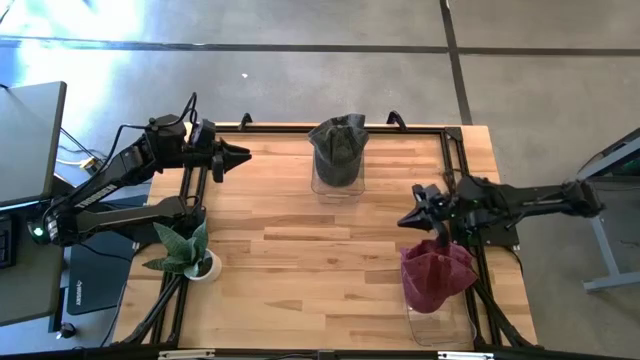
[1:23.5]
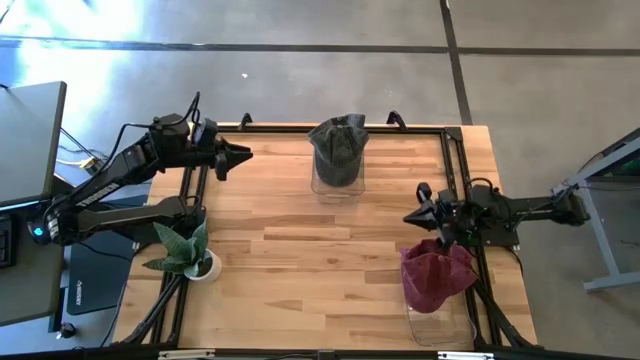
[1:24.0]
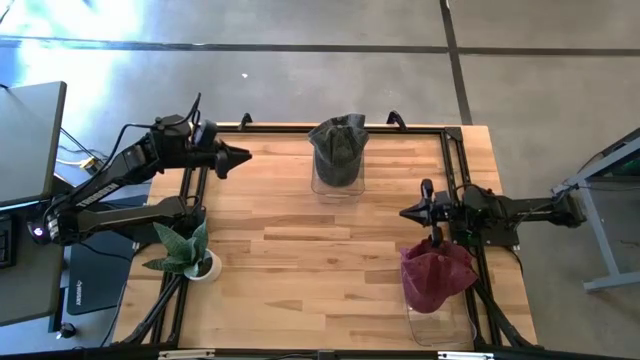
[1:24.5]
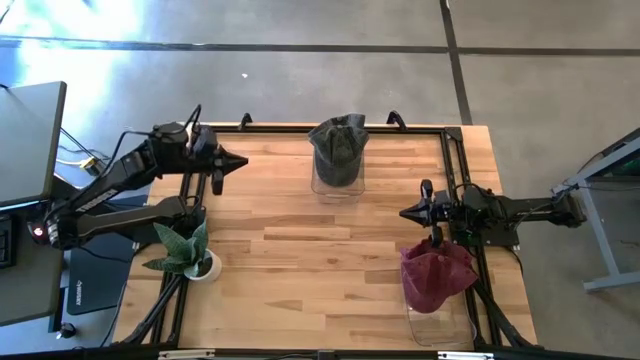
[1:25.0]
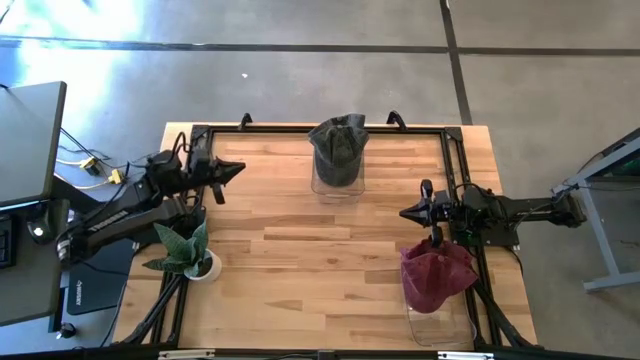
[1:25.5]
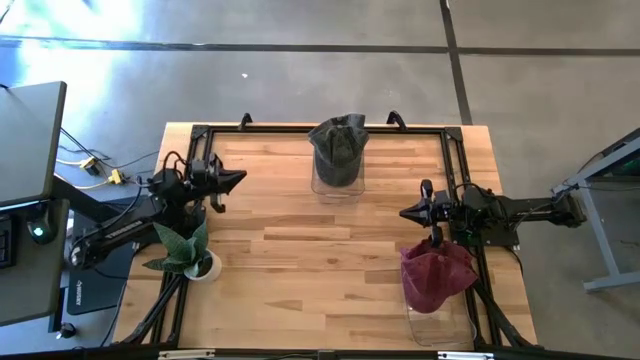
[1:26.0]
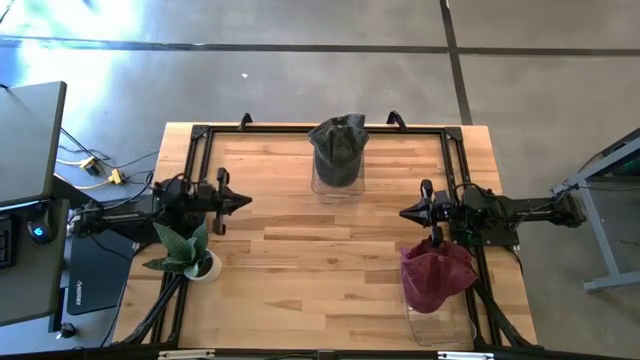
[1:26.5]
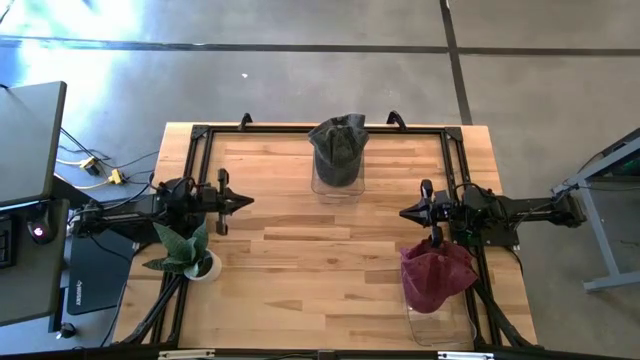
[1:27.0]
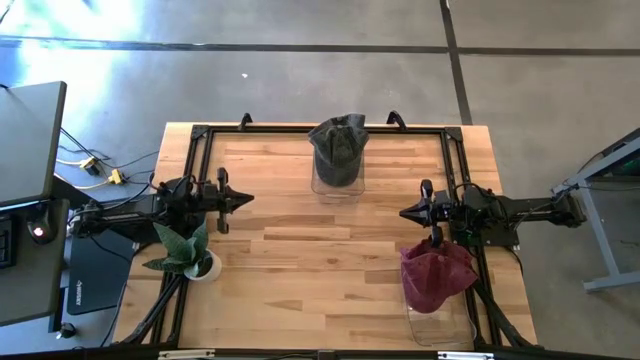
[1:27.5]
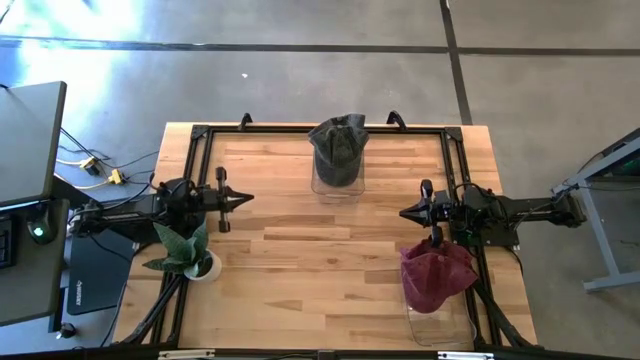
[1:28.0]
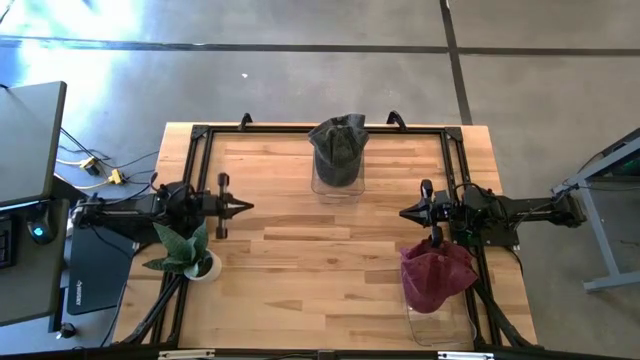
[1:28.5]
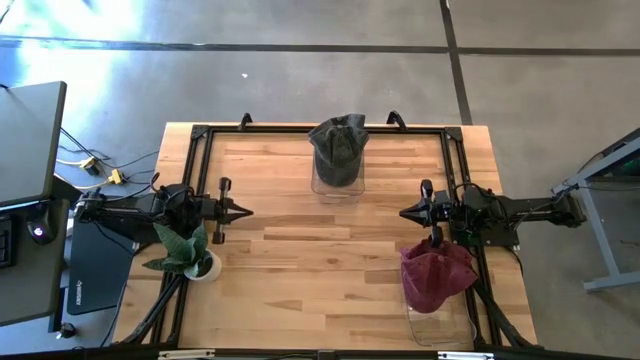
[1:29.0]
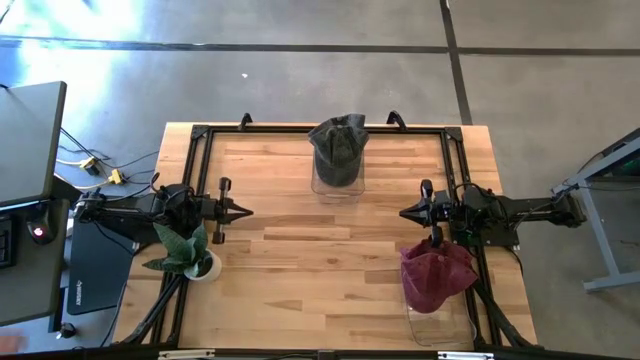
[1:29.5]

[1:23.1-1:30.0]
Task: Pick & Place hat
Return to Home Position

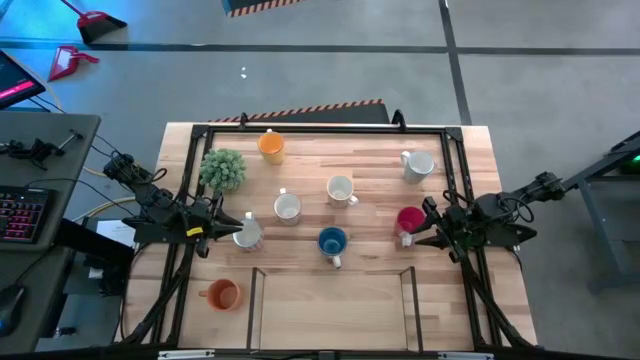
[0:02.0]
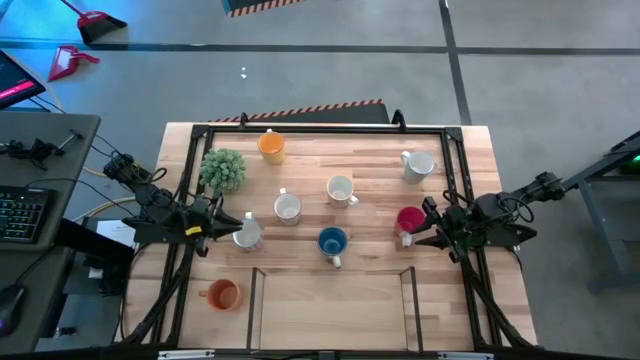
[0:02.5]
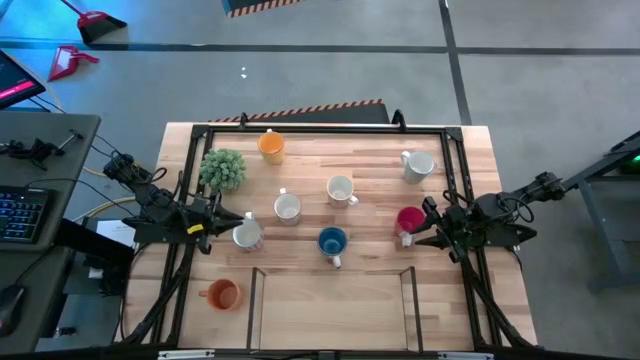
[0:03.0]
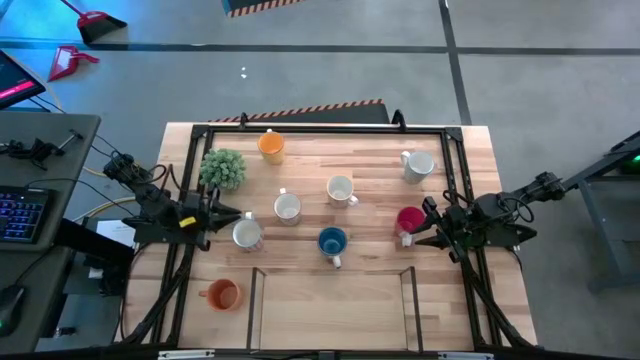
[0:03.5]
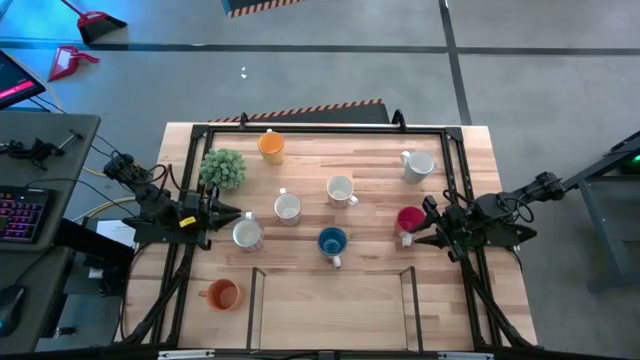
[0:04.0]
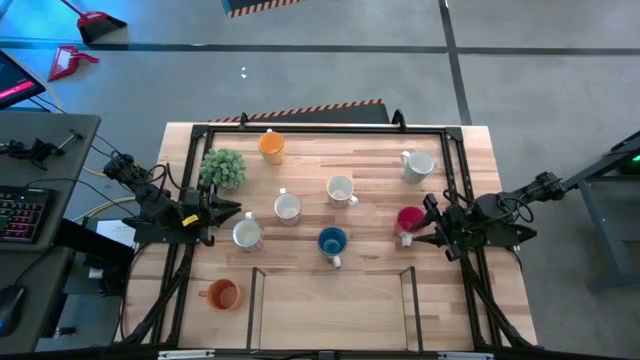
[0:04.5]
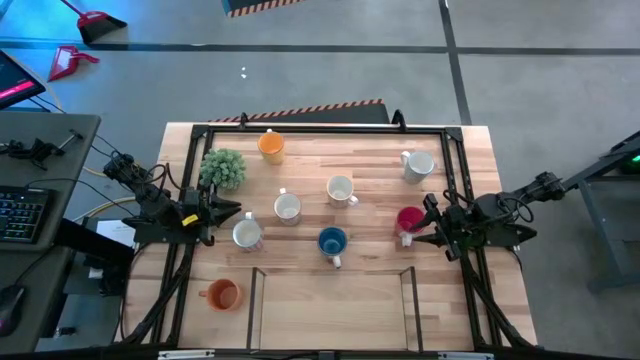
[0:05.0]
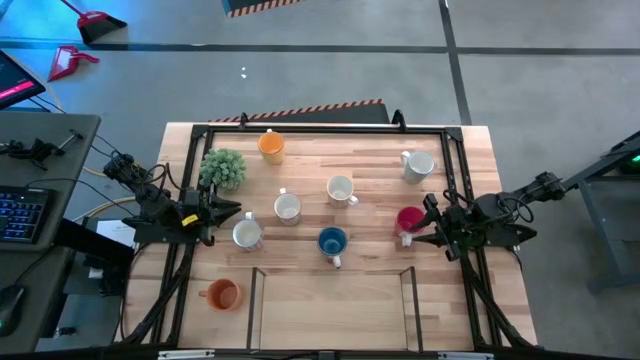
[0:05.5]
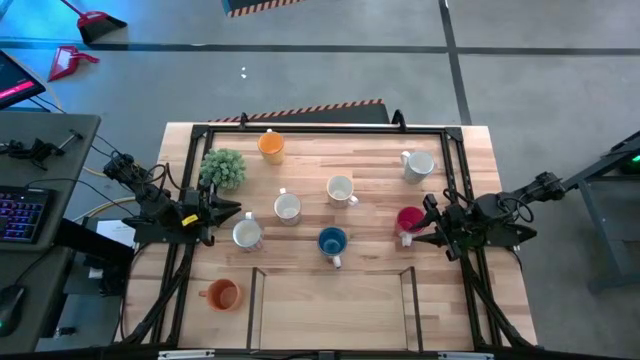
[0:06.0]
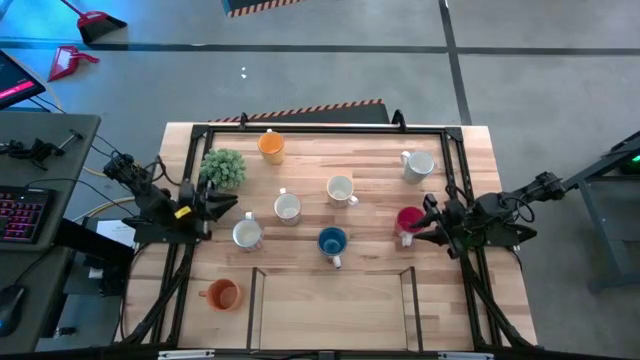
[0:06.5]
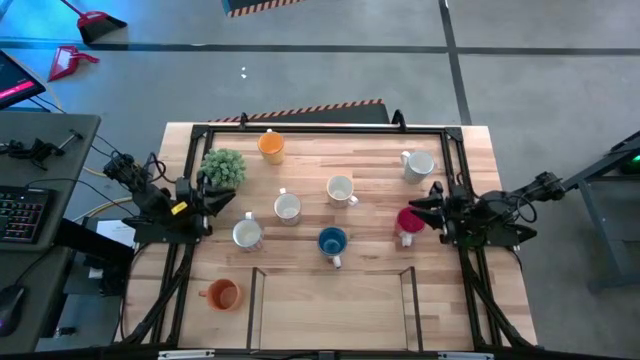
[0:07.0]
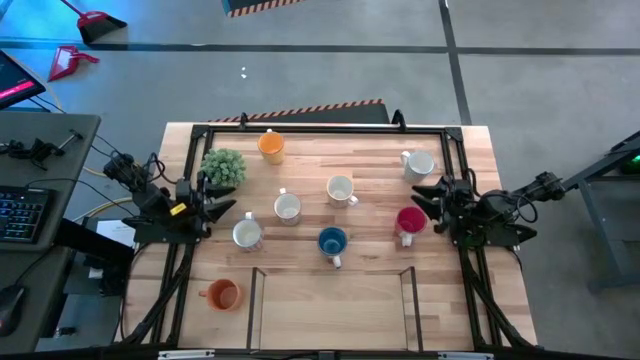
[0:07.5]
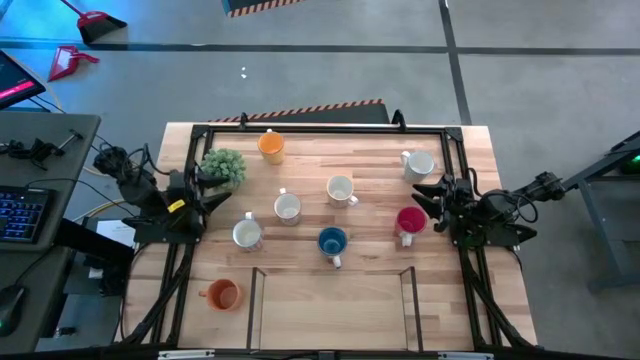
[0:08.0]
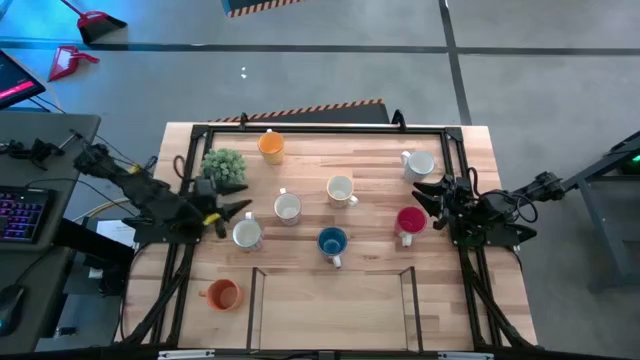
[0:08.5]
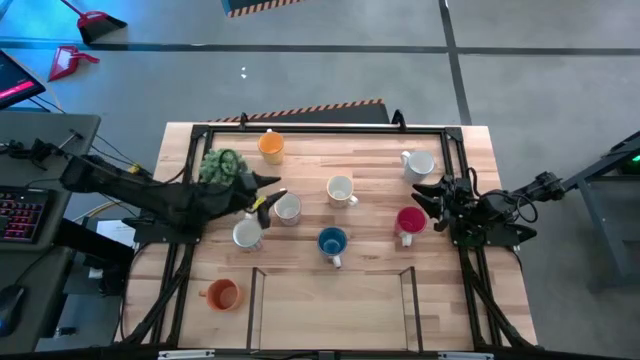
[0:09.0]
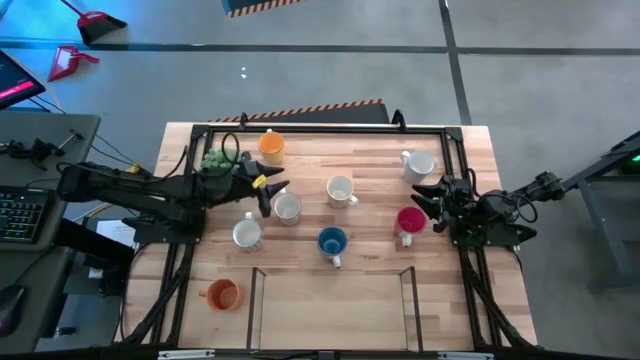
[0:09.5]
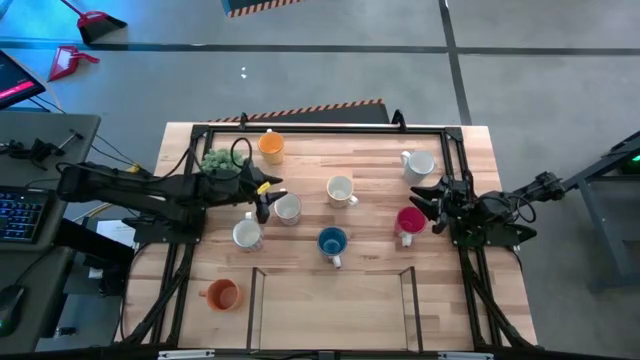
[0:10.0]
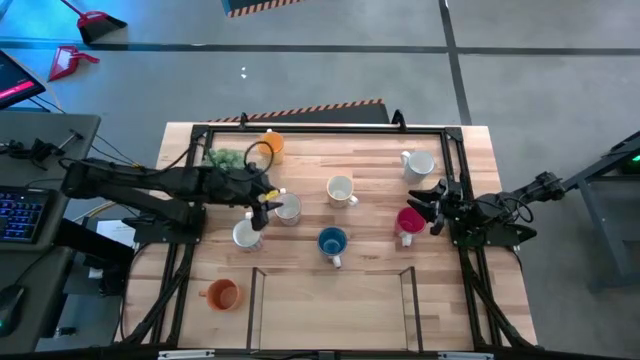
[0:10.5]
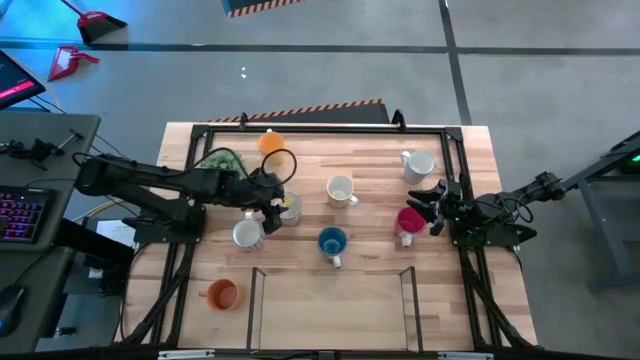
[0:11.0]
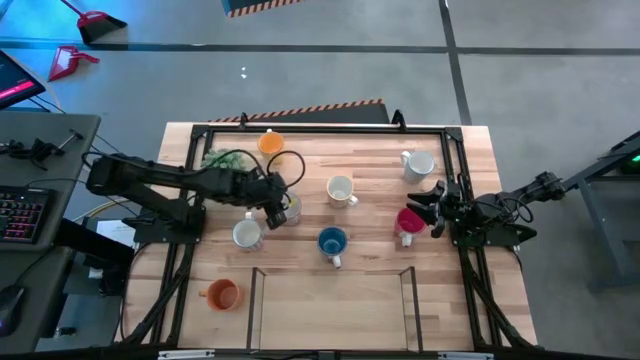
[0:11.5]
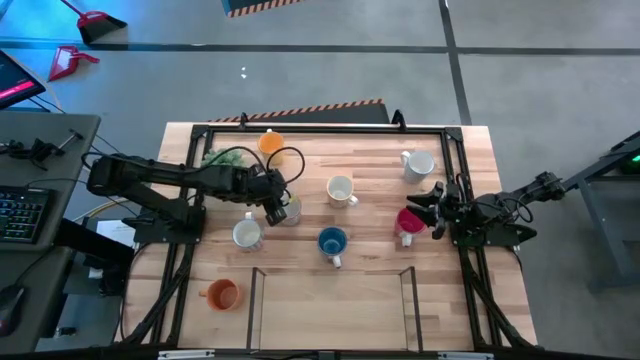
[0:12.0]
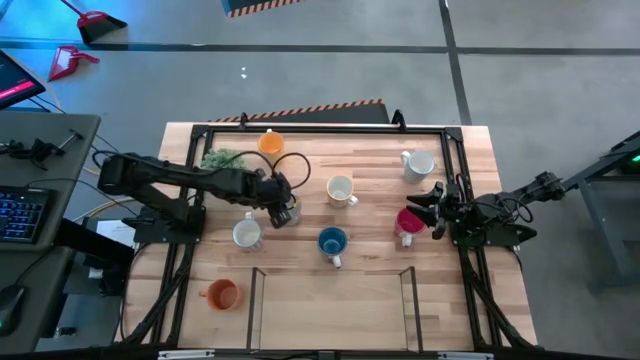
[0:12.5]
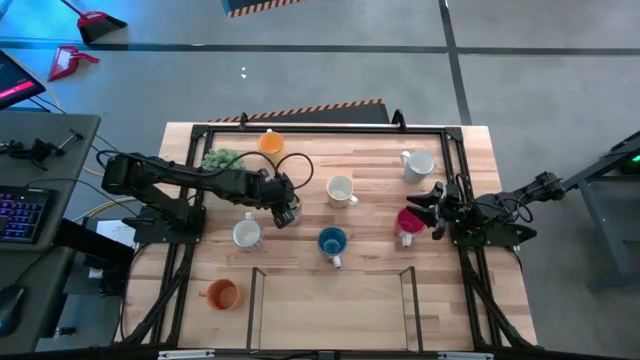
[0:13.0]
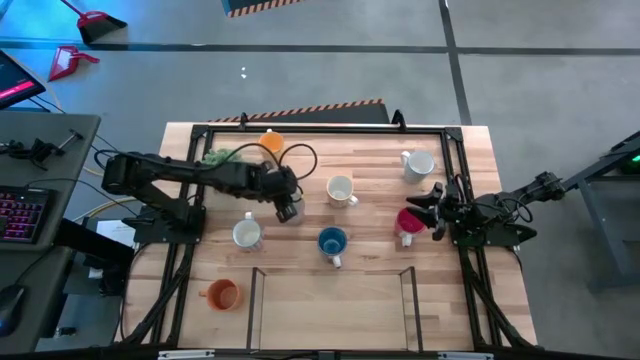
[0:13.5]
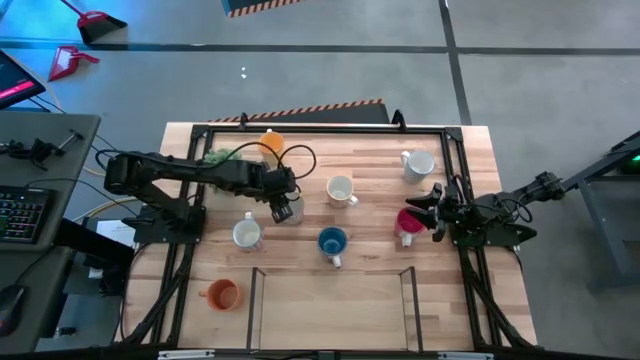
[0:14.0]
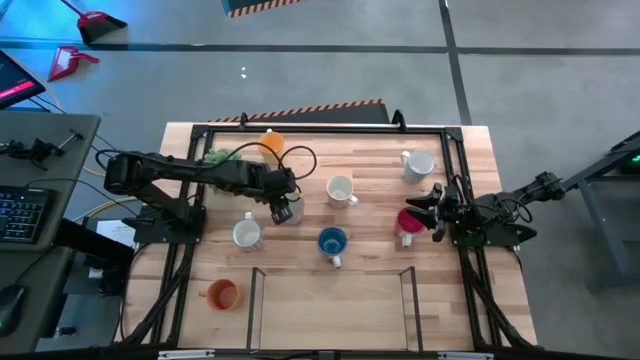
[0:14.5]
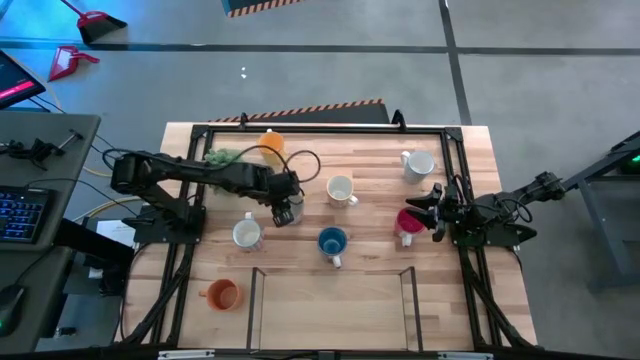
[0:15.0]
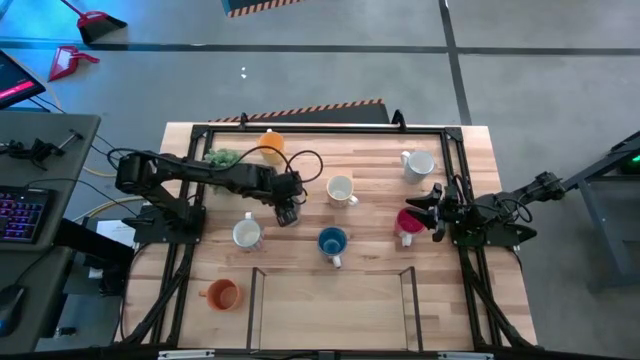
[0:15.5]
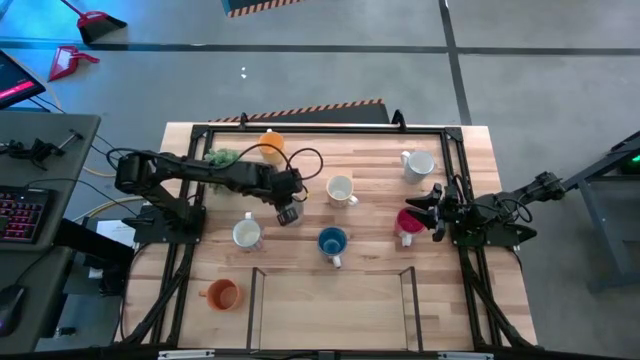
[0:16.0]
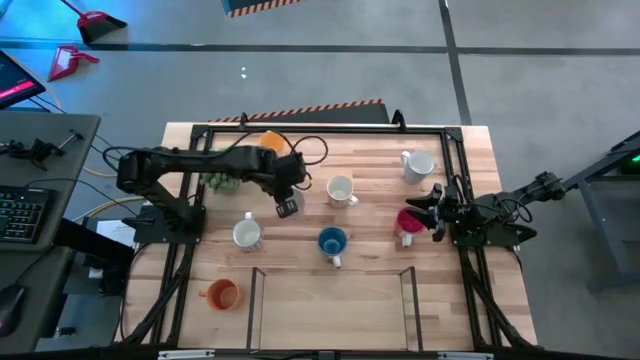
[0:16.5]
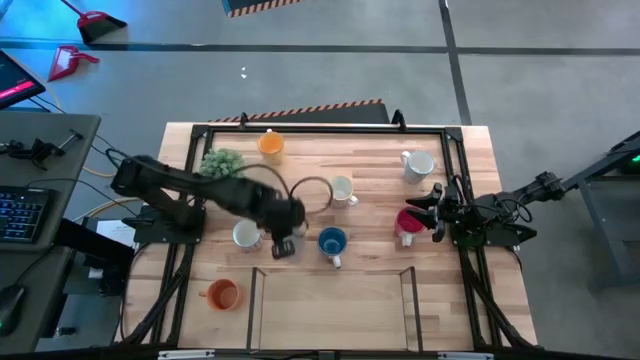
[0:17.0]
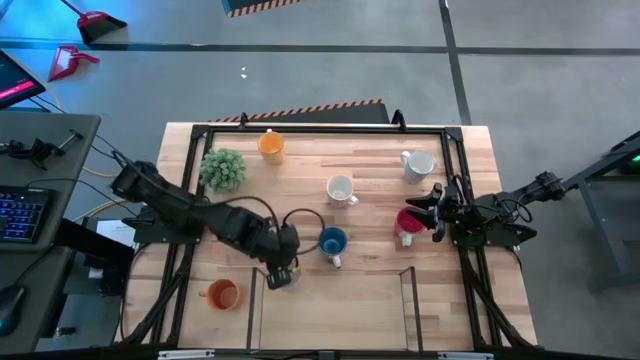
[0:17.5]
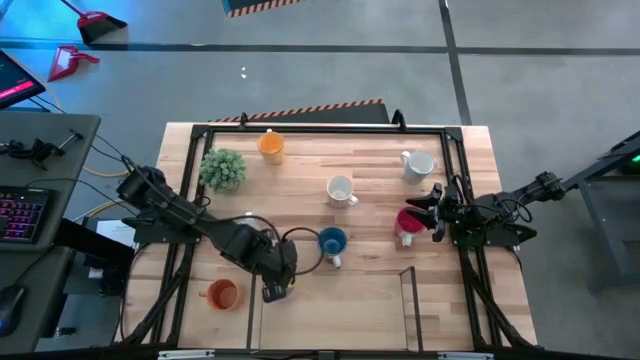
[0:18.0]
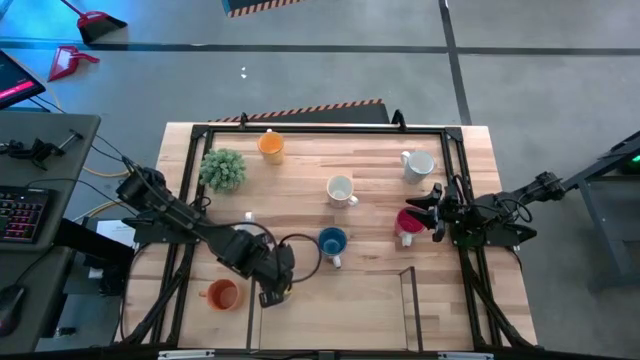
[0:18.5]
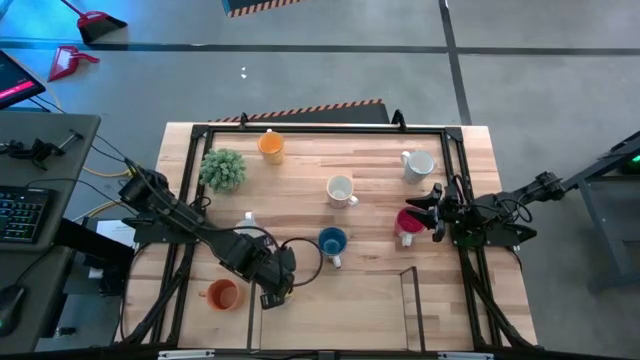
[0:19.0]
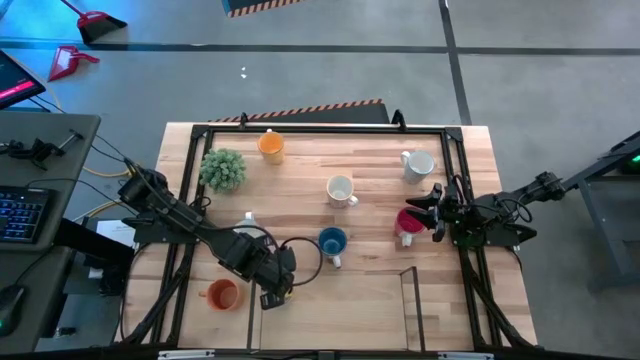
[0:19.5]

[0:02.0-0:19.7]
Task: Place coffee mugs
Put the middle left gray pattern mug on the shelf
